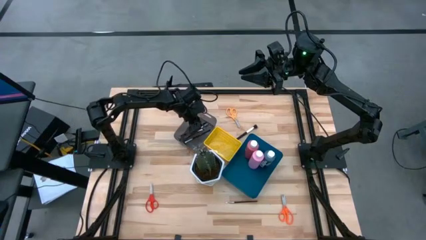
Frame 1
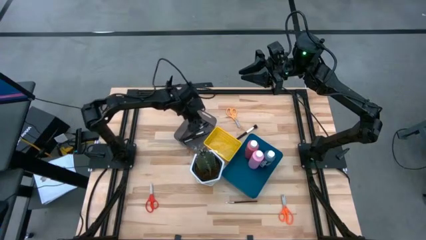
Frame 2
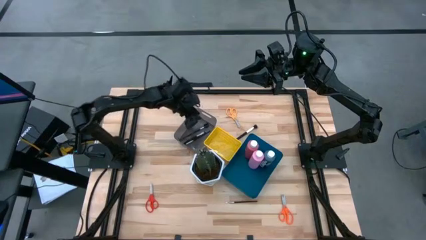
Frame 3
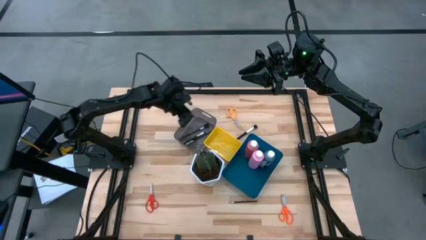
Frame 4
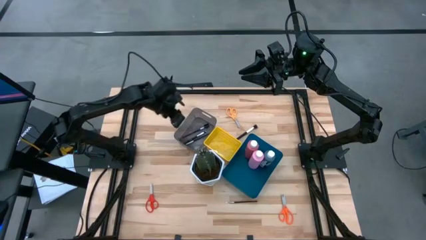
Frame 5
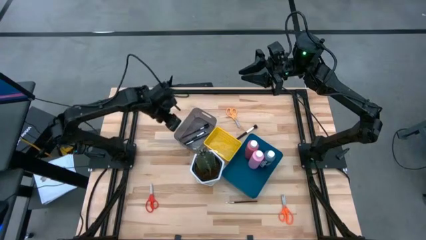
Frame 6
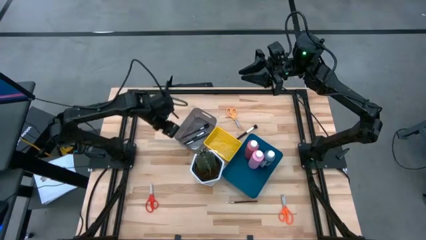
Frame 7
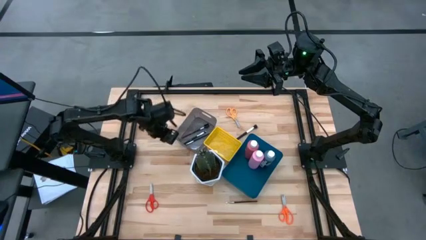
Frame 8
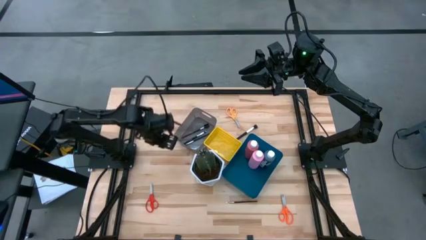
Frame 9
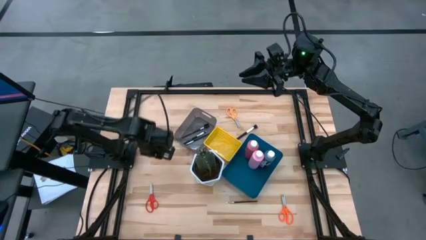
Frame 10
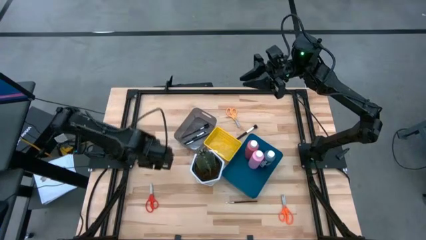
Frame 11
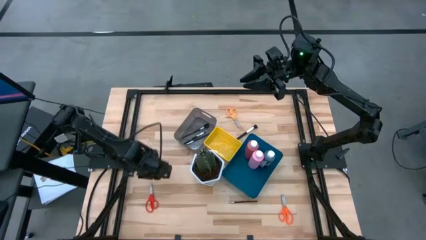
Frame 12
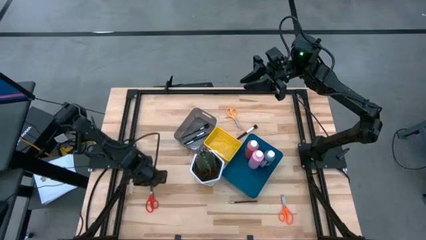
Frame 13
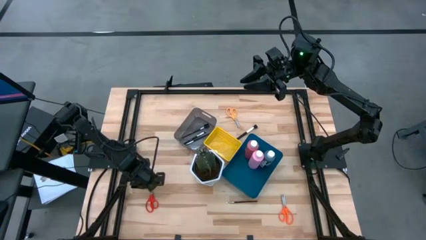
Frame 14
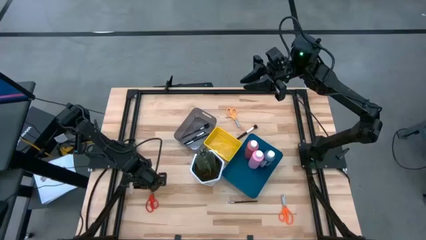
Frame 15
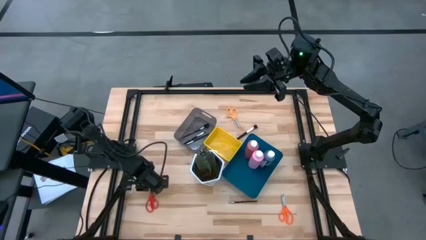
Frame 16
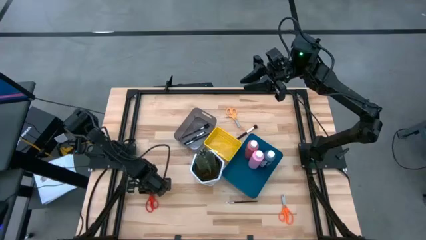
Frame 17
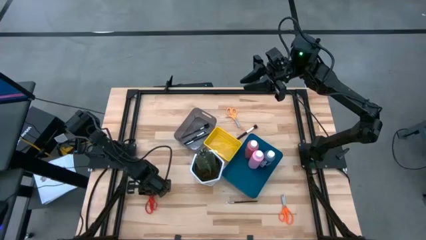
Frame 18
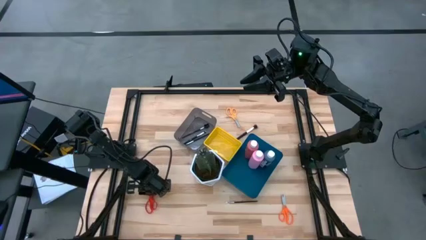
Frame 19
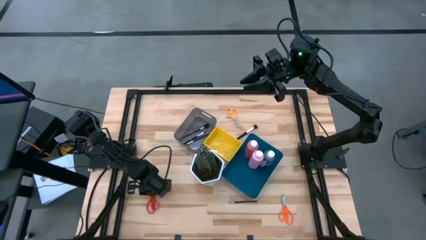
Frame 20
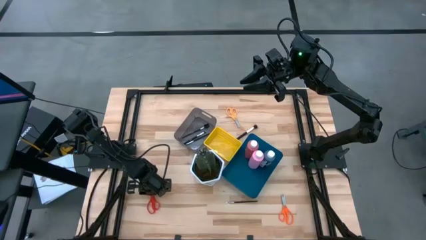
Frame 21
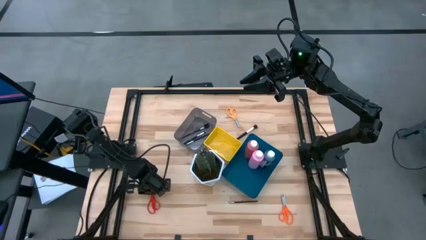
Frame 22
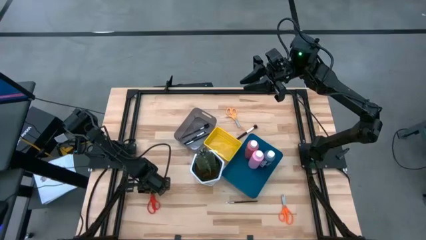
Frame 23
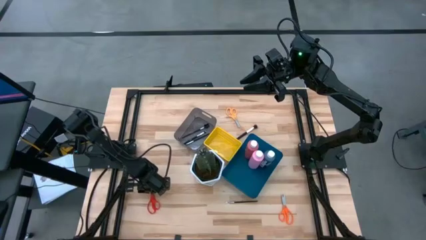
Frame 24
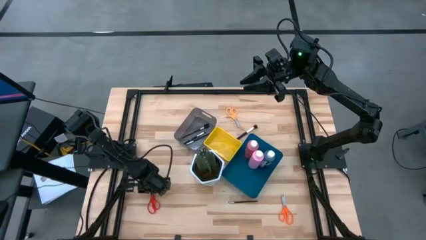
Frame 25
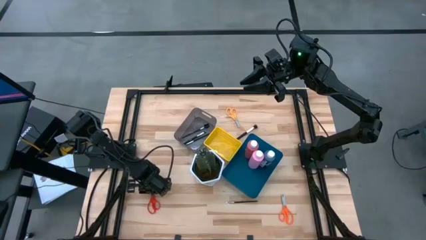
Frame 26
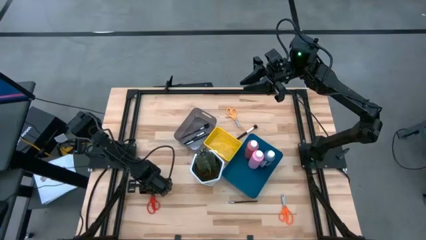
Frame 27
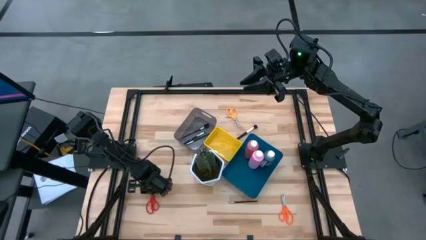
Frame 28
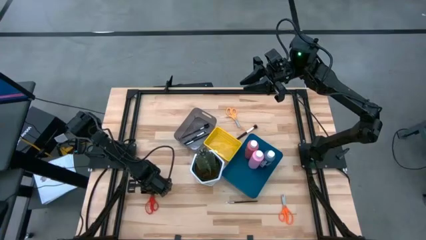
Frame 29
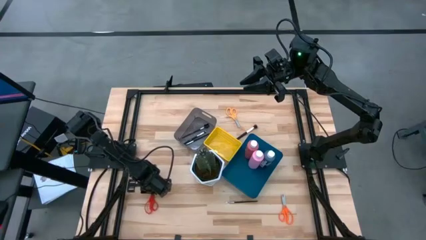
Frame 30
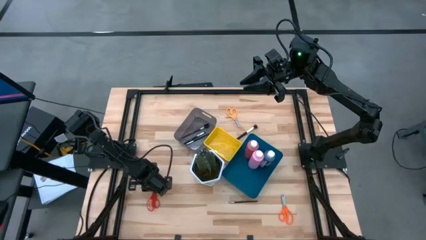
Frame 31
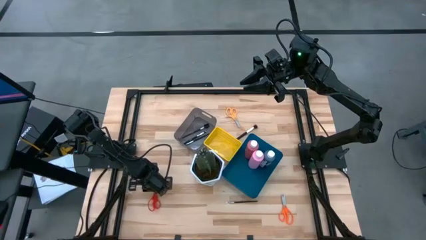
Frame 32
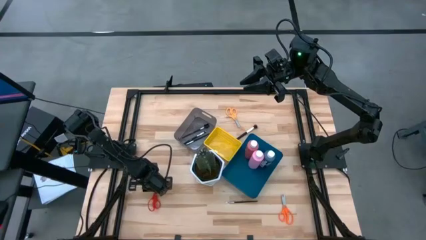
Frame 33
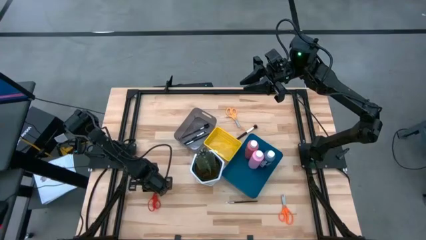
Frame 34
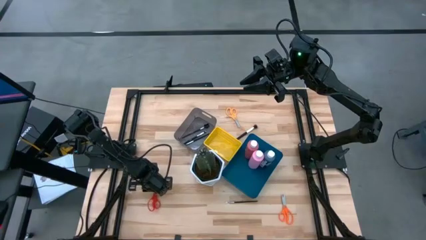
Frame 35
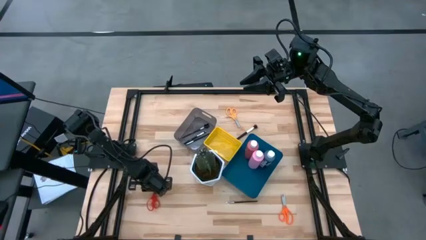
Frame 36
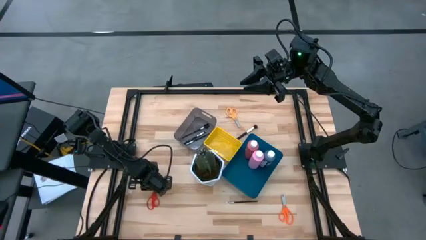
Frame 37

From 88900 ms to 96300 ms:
Task: Pick & Place Paint Supplies
Put the red scissors into the yellow bin

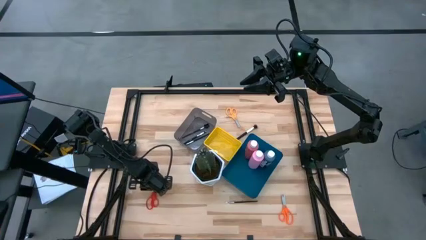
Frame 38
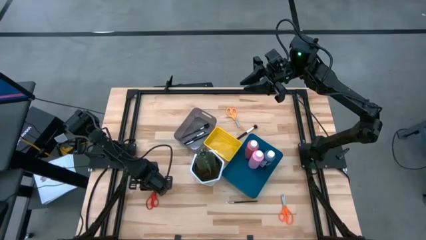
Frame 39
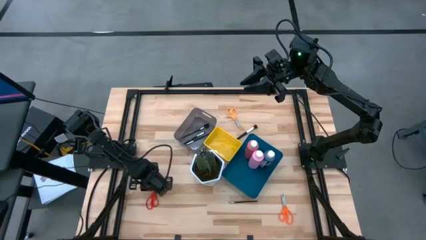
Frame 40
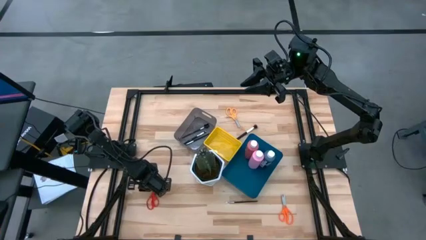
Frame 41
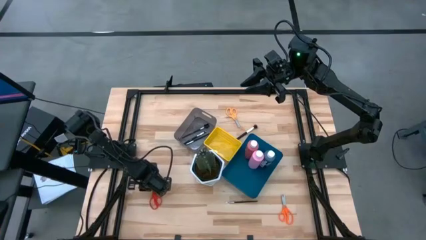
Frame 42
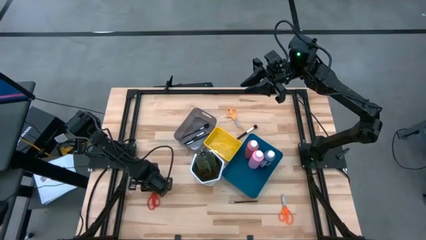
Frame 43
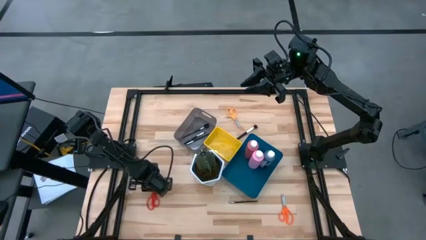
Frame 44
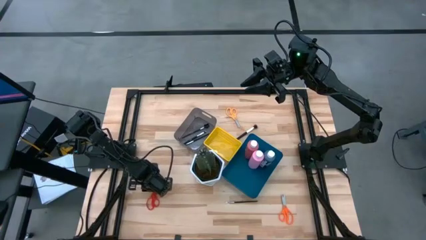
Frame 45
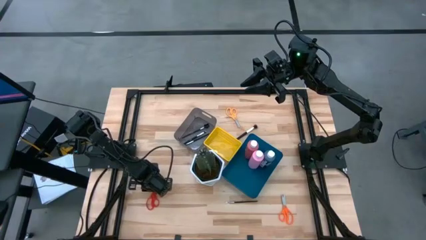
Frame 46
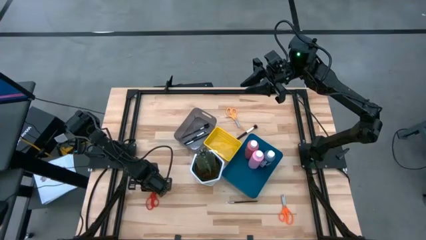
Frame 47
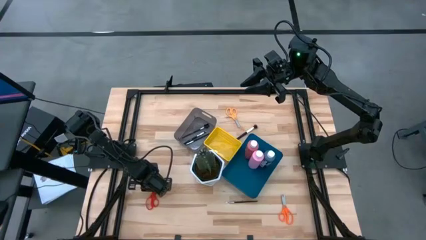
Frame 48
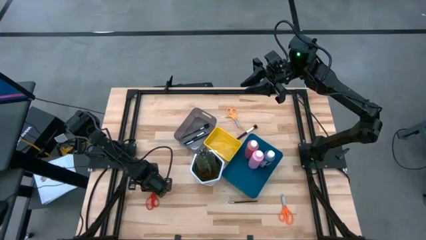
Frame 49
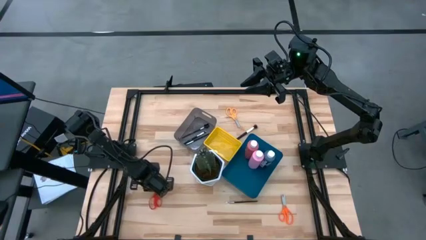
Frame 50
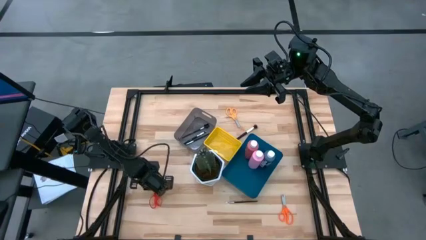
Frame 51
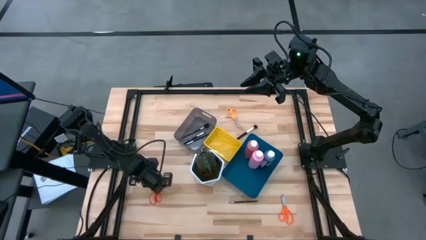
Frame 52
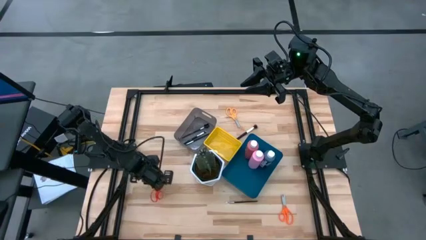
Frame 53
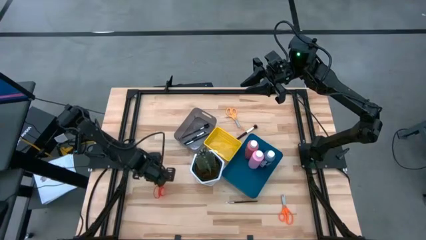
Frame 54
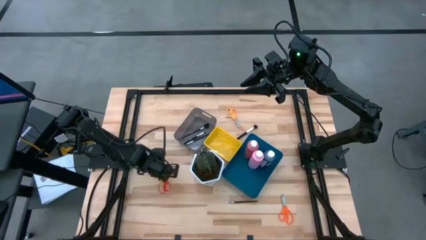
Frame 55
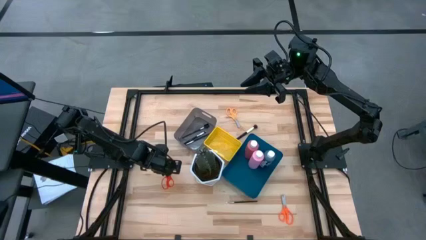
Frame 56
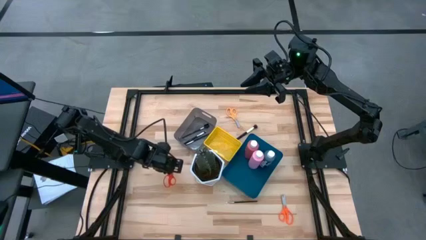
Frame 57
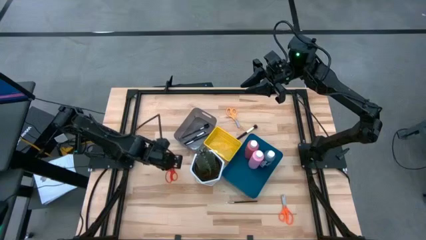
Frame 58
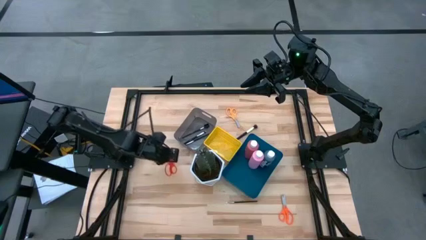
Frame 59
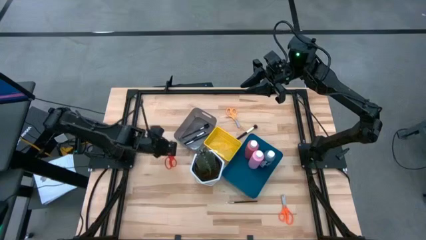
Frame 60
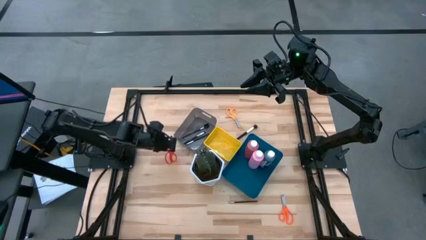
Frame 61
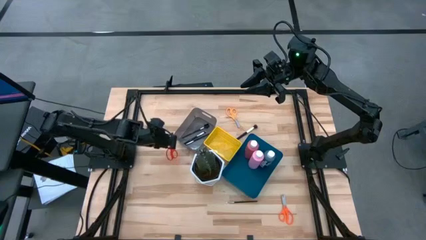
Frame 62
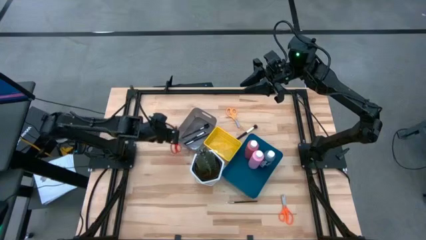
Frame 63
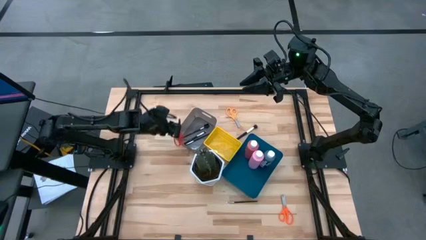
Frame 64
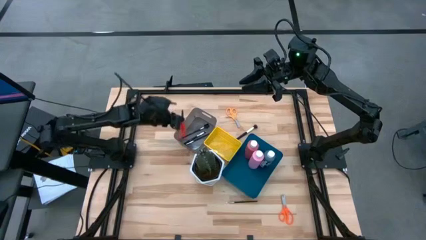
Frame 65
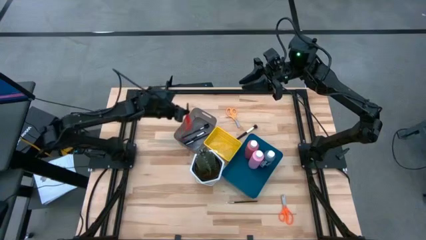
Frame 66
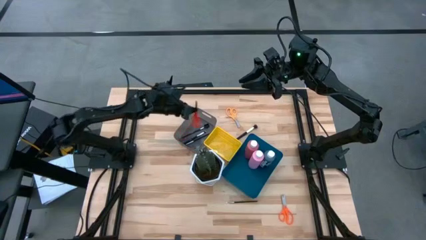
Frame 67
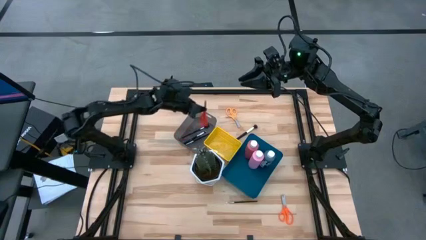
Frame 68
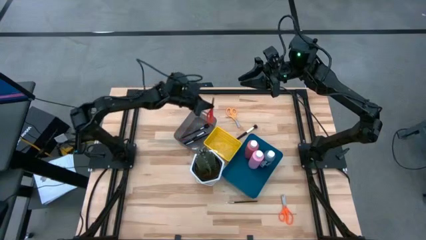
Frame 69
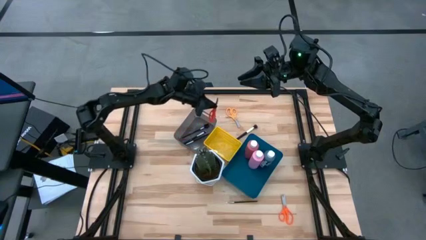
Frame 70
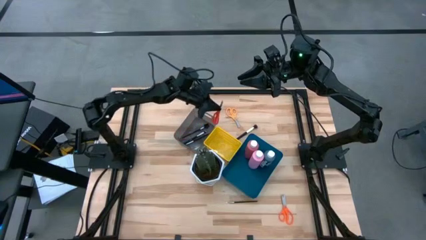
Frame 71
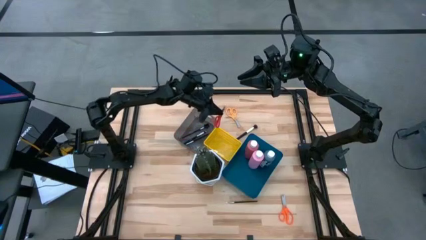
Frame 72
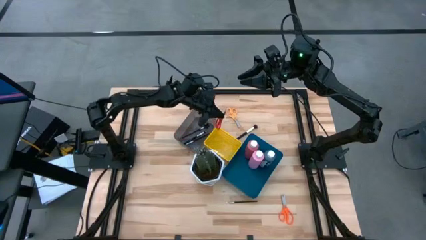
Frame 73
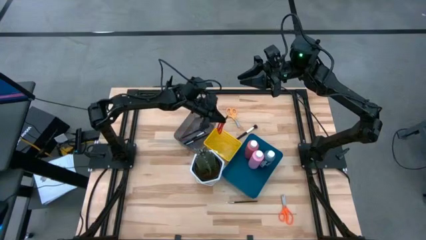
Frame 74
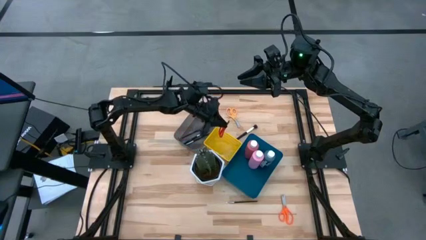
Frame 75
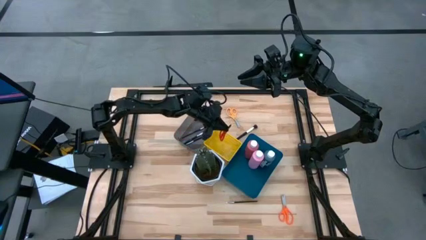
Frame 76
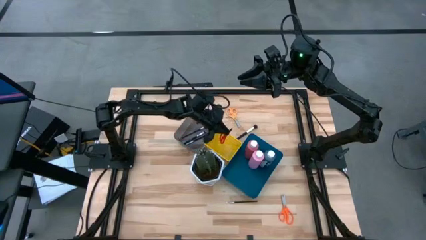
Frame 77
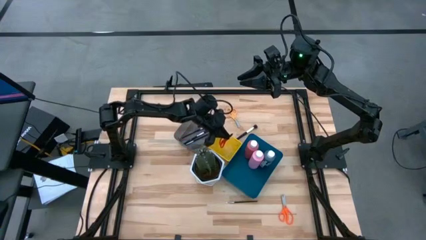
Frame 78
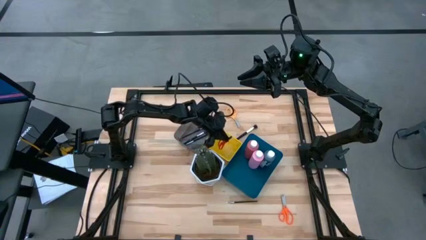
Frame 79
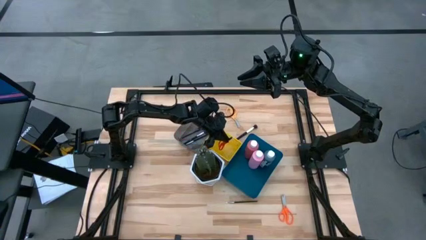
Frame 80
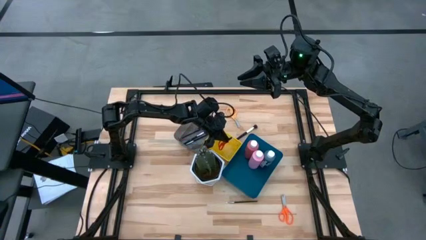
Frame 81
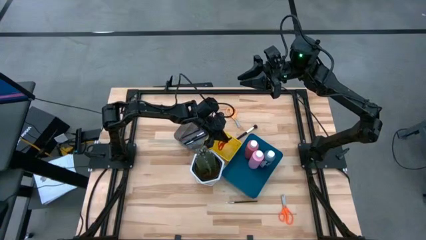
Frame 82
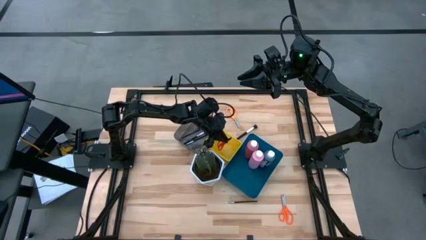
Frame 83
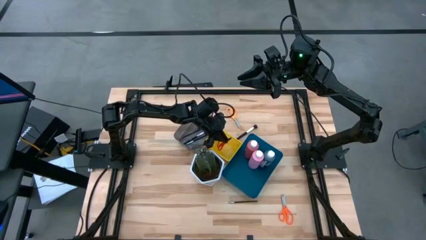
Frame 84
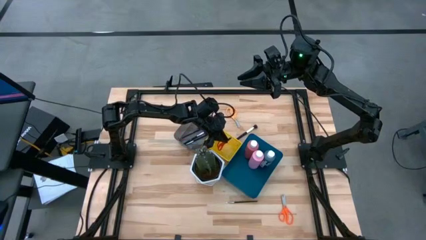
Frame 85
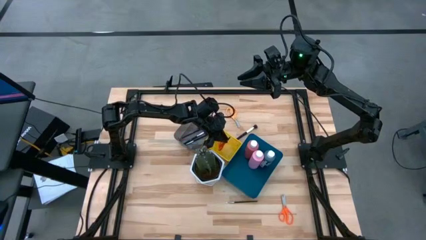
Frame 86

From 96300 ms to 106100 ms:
Put the red scissors into the yellow bin
